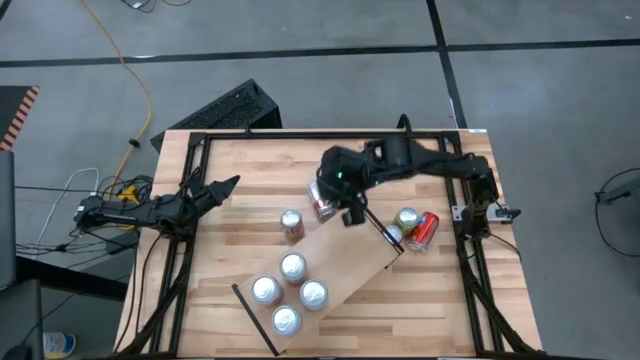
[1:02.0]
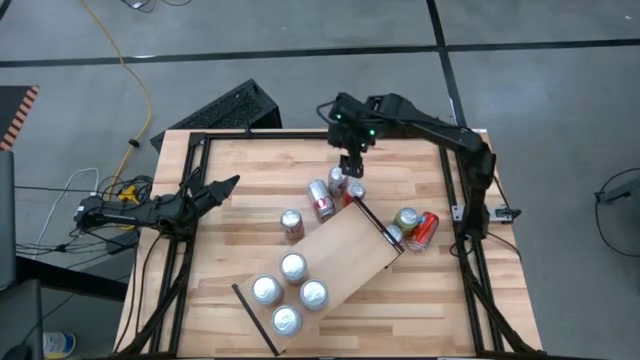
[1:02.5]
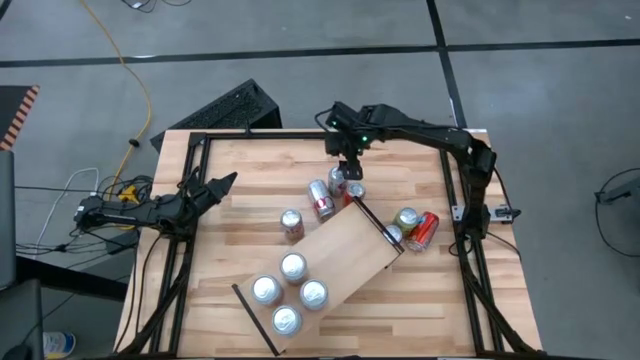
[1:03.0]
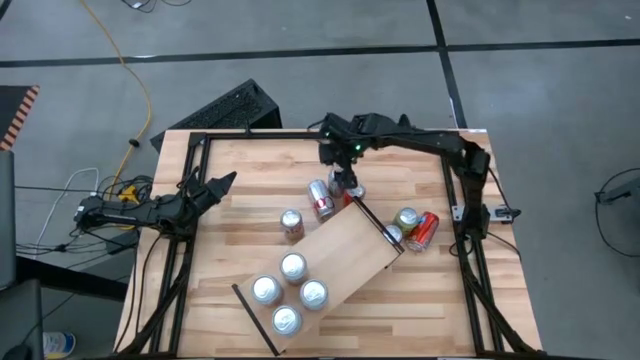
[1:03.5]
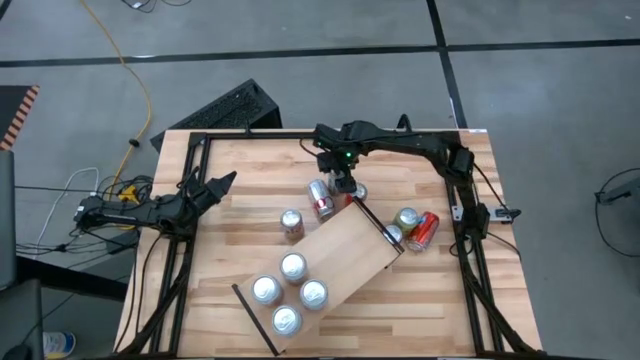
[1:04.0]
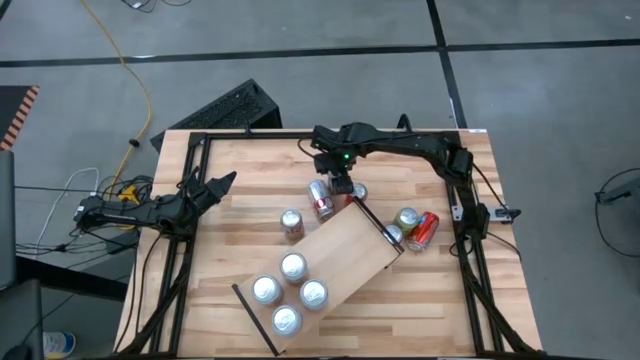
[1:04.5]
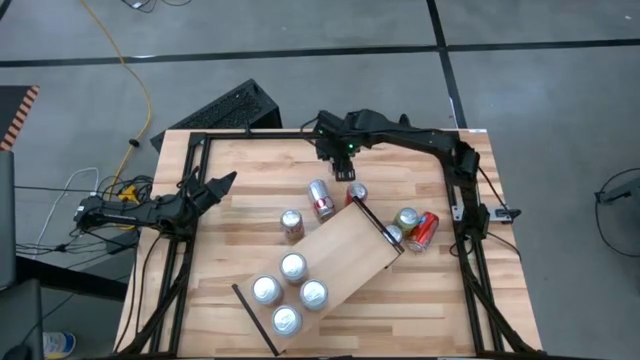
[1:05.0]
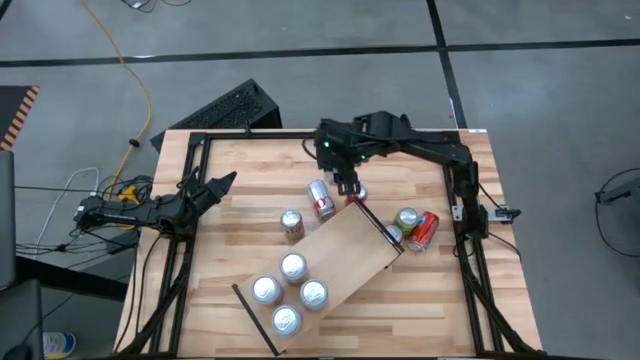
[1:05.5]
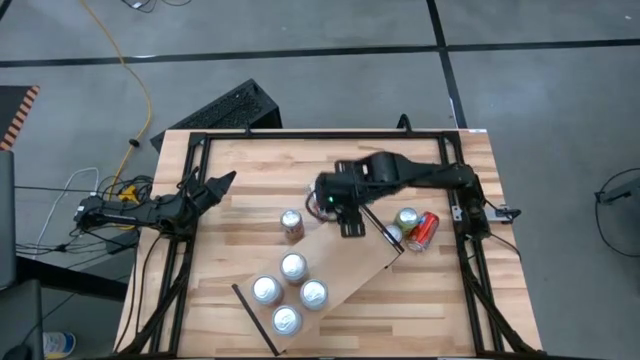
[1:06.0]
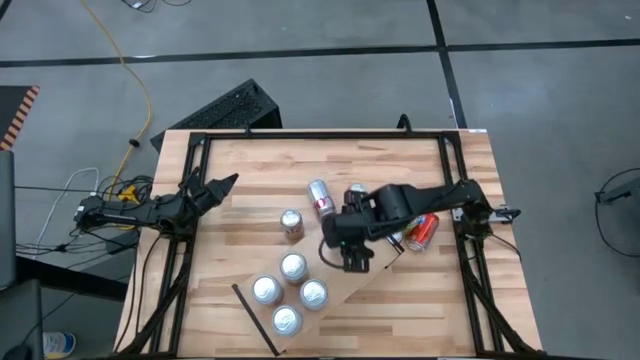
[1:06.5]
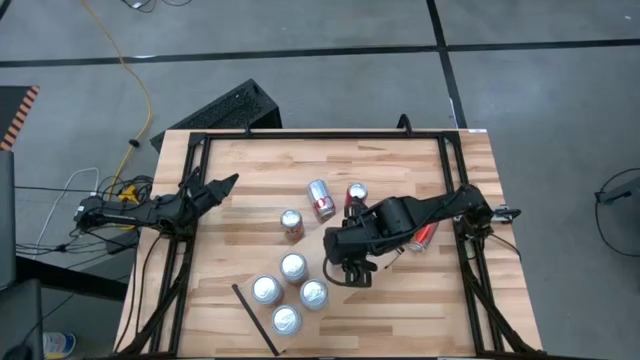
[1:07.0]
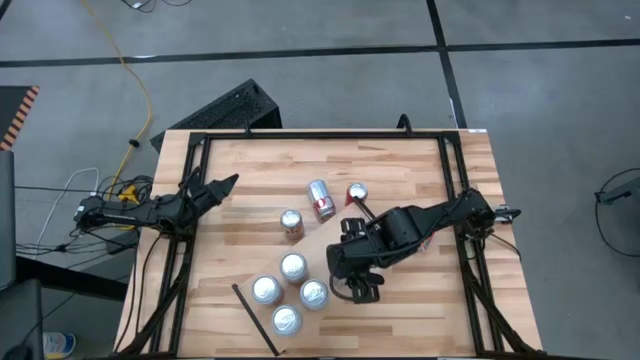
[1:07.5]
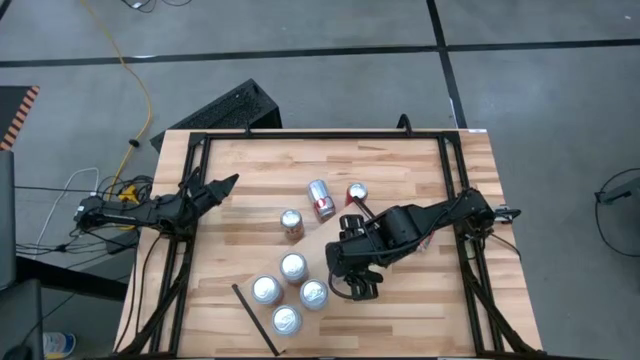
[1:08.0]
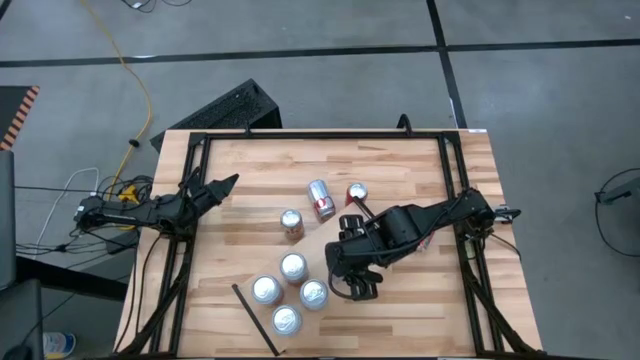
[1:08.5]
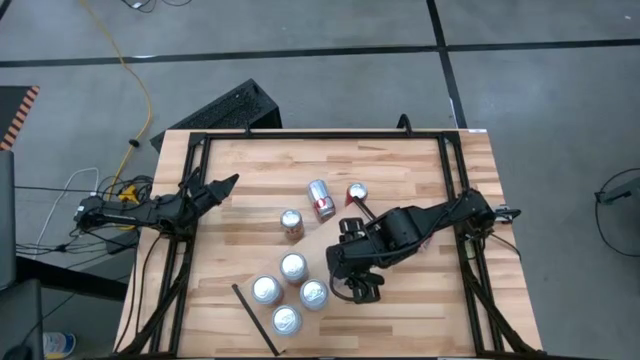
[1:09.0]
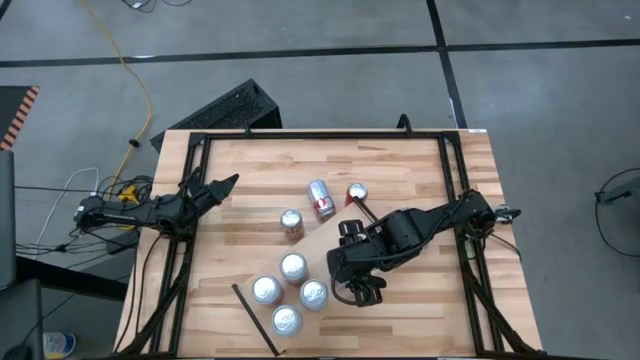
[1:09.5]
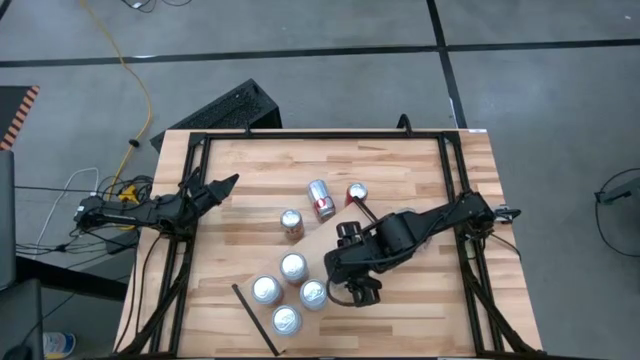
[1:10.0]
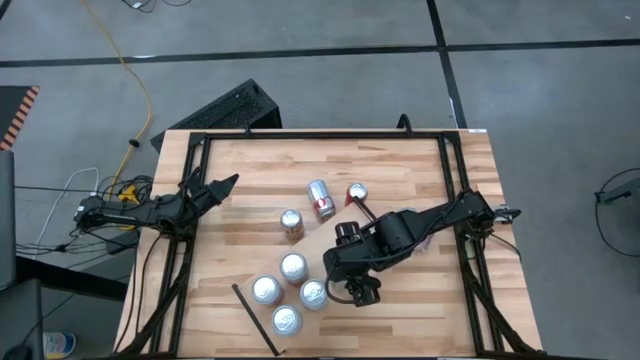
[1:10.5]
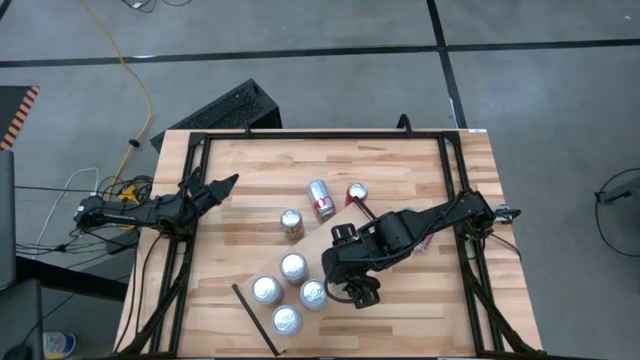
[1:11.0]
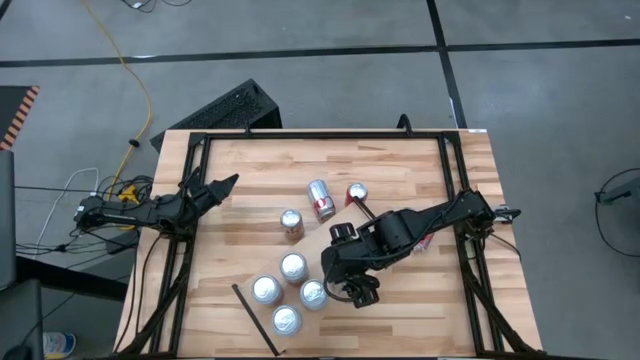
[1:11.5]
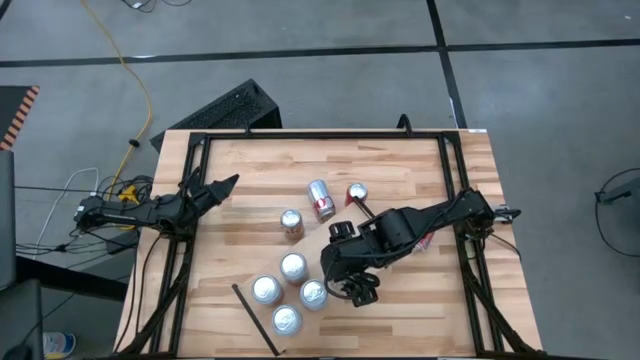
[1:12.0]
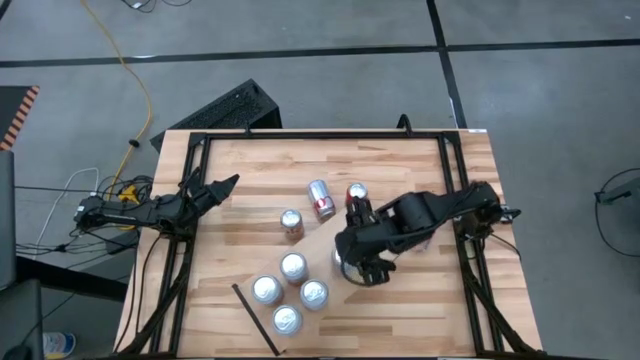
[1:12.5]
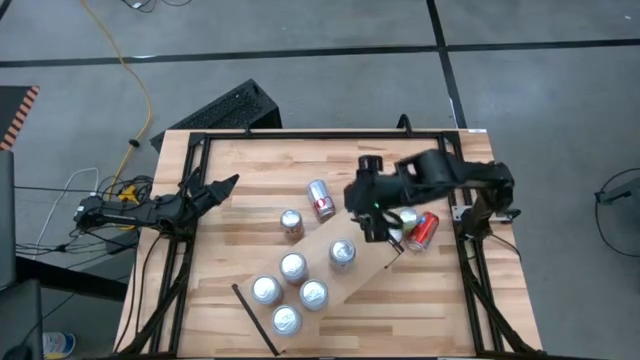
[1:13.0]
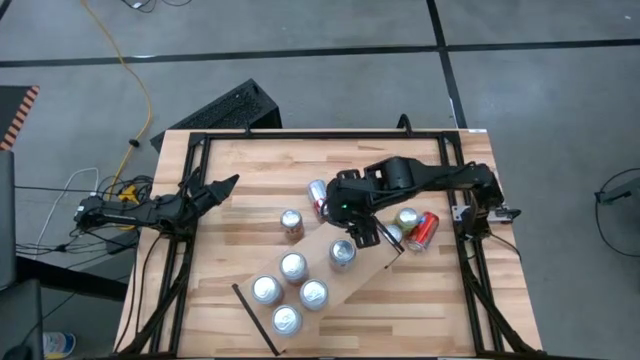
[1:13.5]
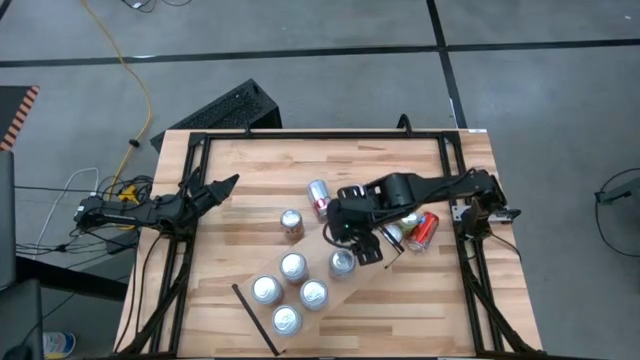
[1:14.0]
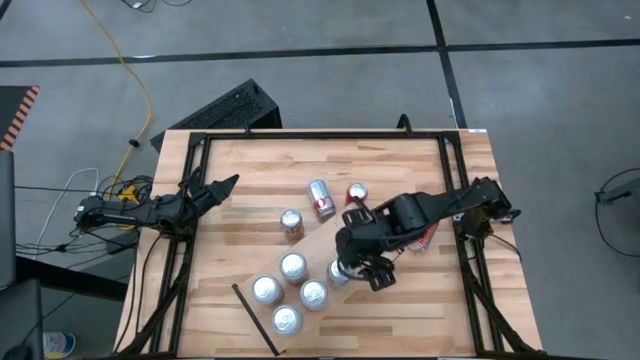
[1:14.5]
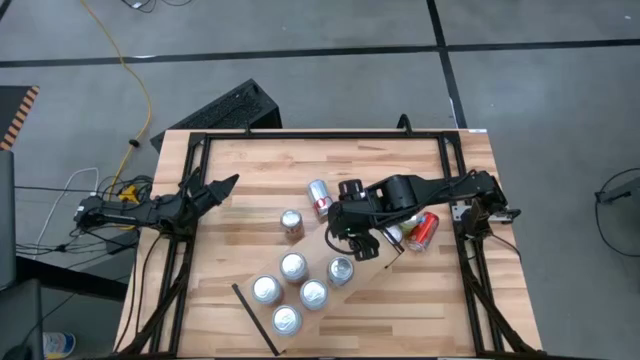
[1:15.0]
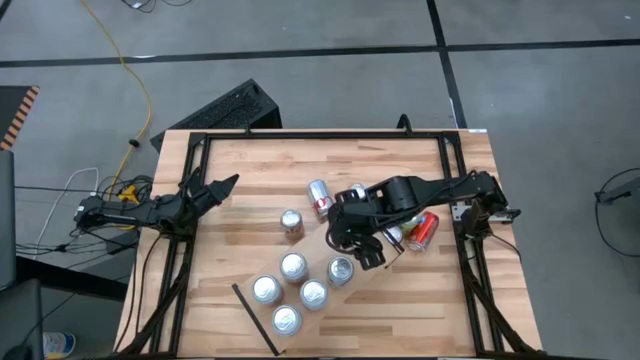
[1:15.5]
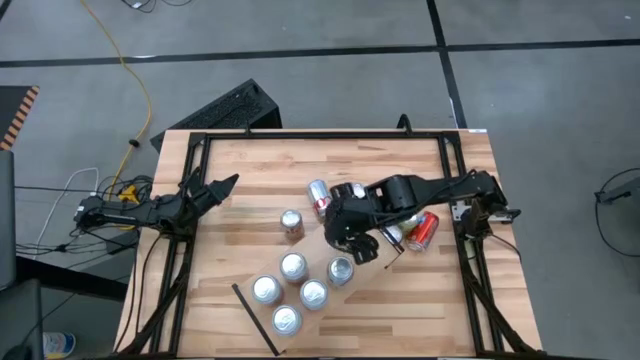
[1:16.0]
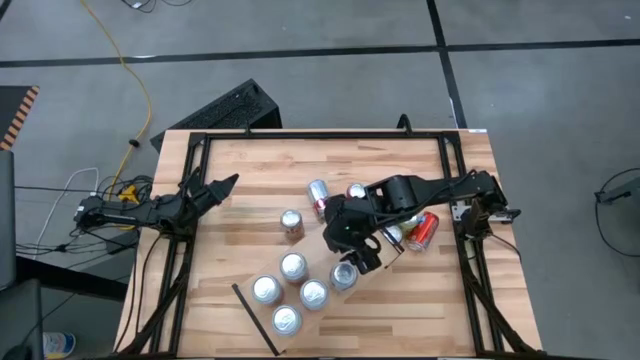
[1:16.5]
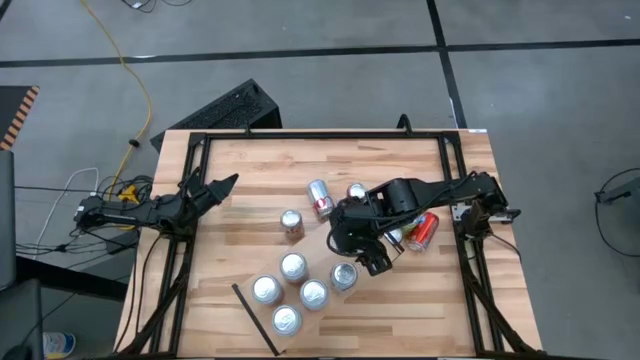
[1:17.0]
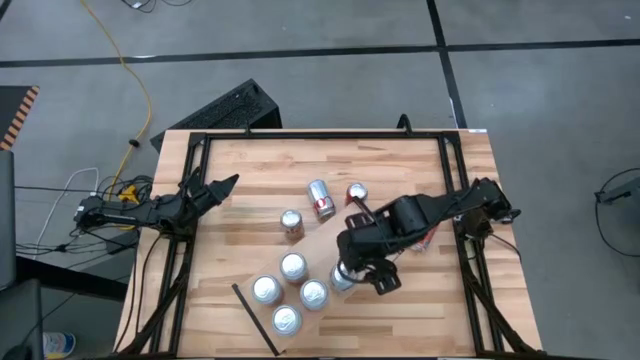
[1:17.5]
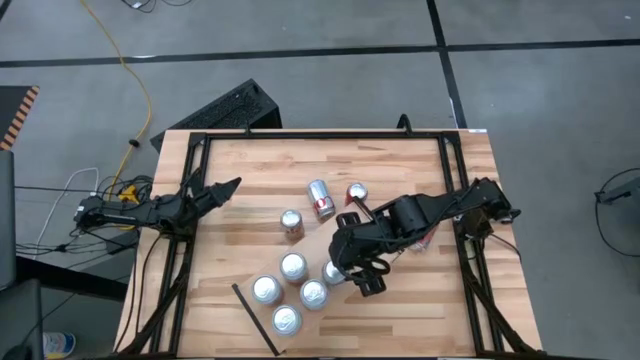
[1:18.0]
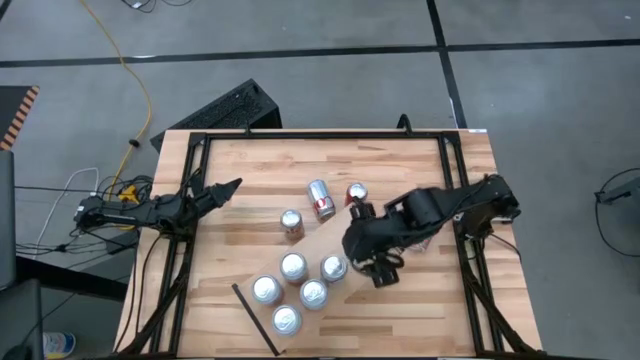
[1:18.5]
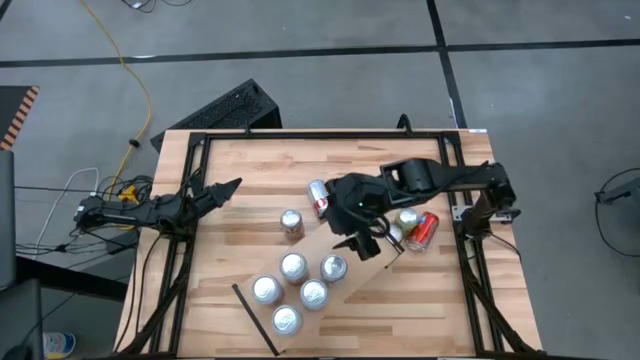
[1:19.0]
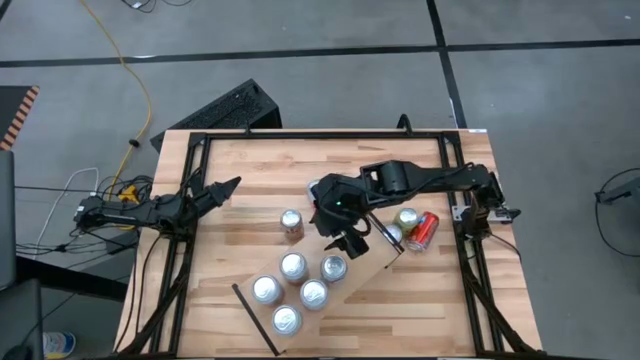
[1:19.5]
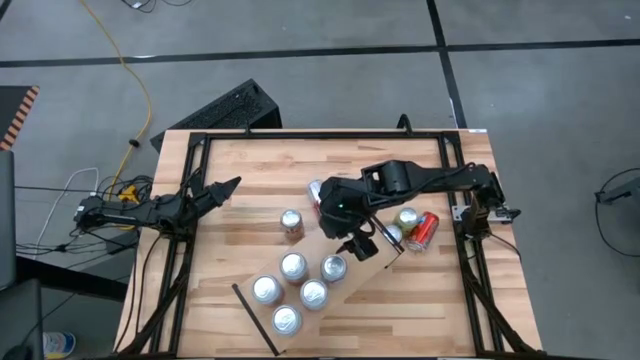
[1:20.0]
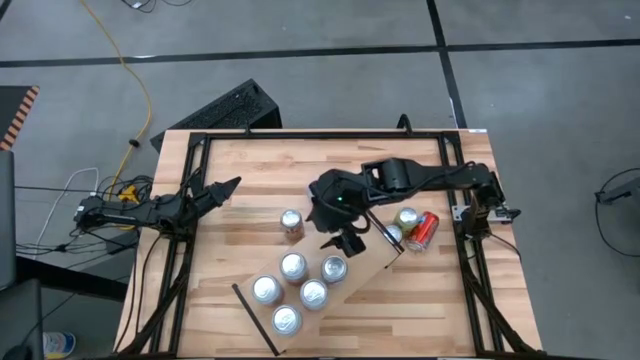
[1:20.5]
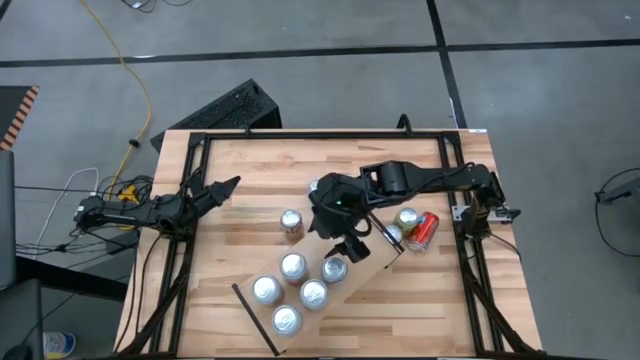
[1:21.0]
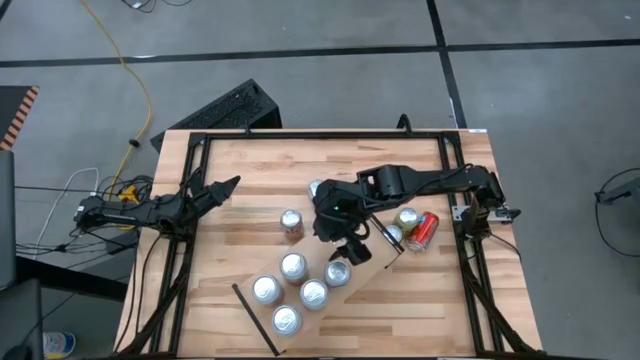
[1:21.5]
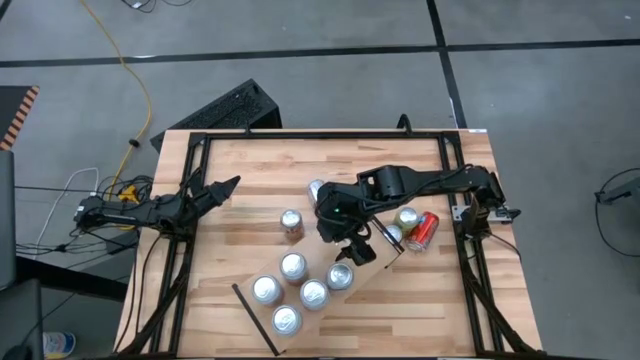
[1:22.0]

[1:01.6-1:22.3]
Task: Place canned beverage on shelf
Put the red silver soda can on the shelf

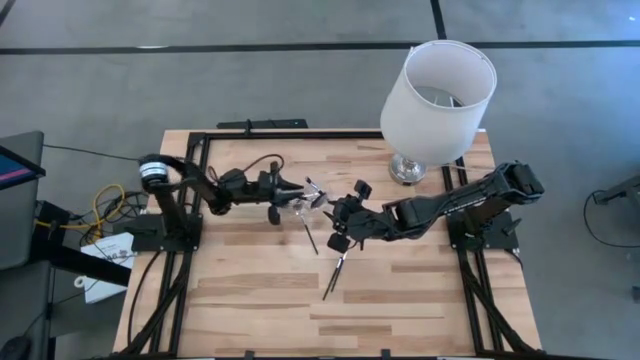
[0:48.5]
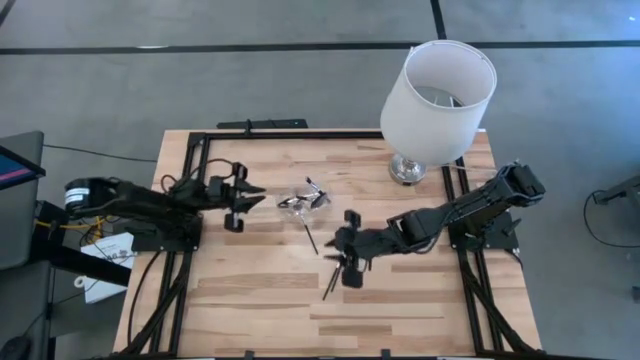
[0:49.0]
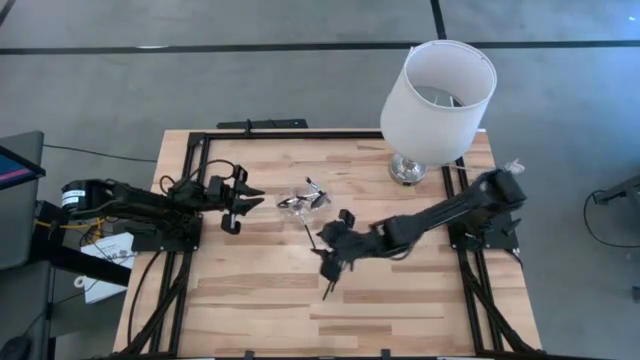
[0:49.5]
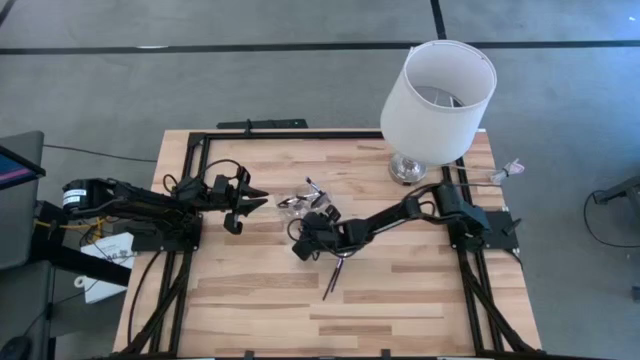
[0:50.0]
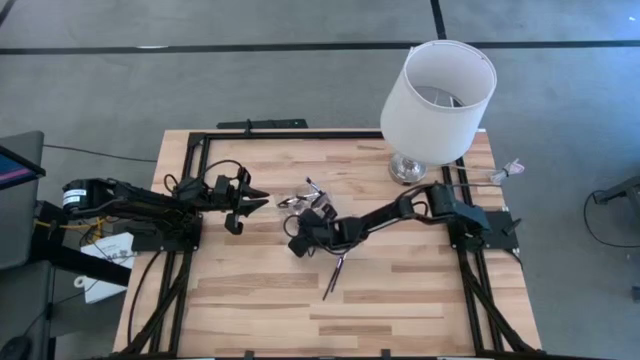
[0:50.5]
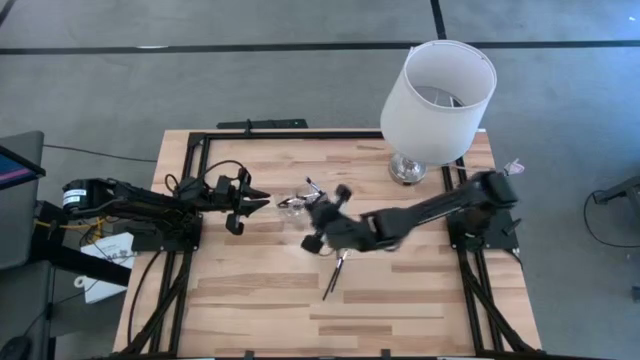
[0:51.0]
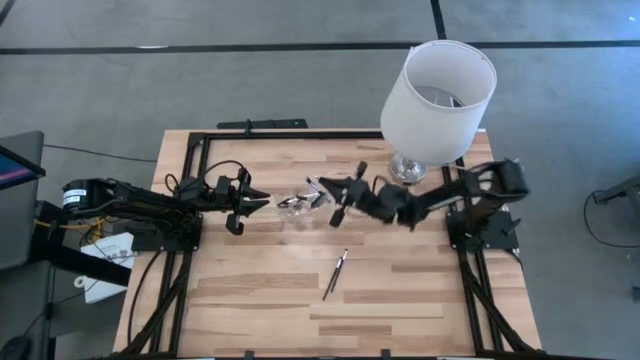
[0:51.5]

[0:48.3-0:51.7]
Task: Pick & Place Makeup Supplies
Put the black makeup brush into the transparent organizer
